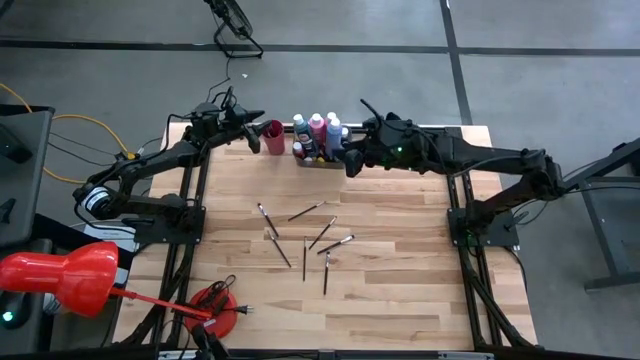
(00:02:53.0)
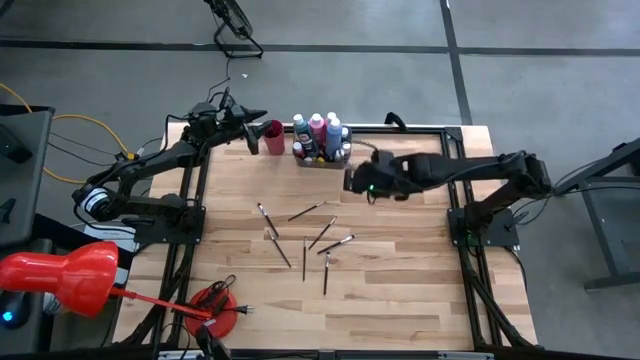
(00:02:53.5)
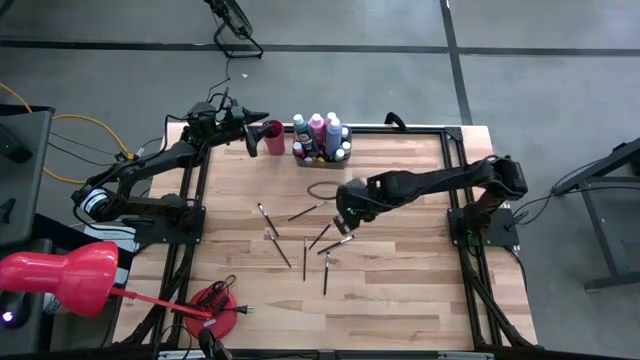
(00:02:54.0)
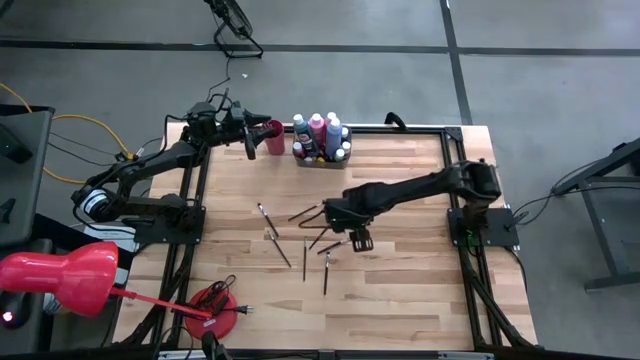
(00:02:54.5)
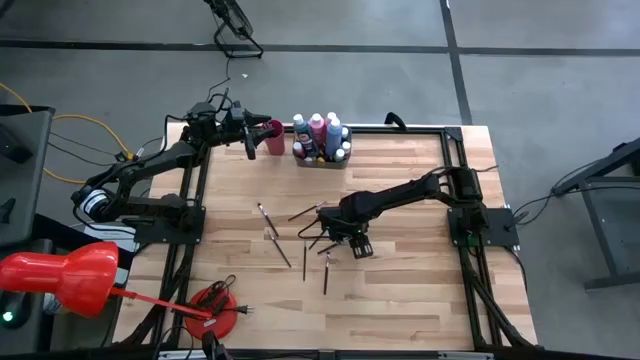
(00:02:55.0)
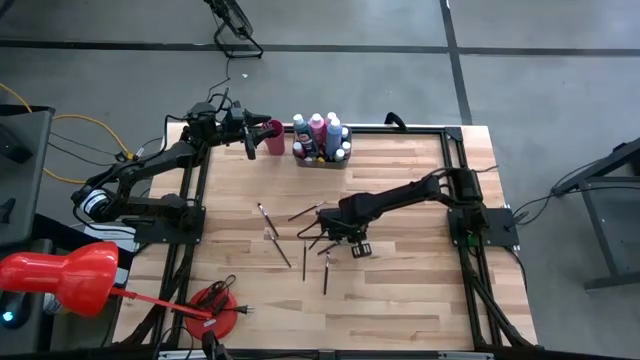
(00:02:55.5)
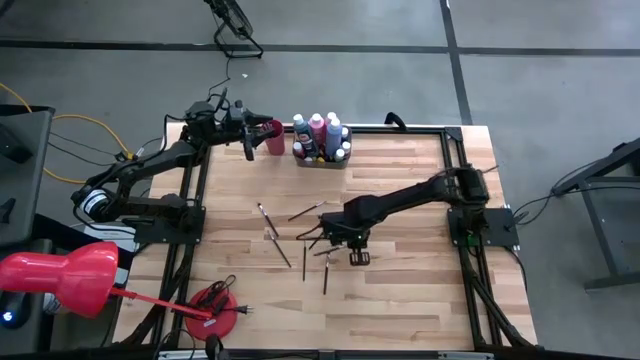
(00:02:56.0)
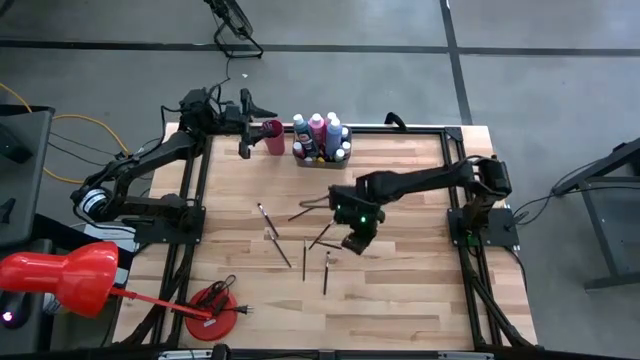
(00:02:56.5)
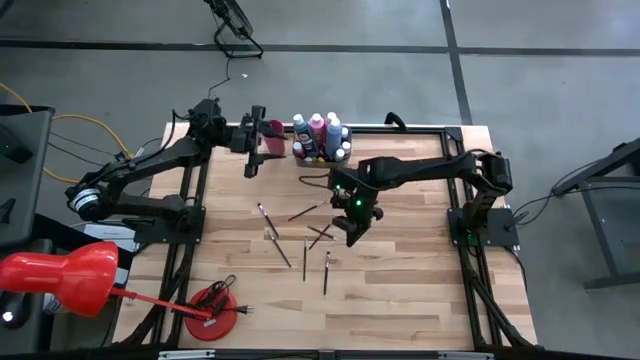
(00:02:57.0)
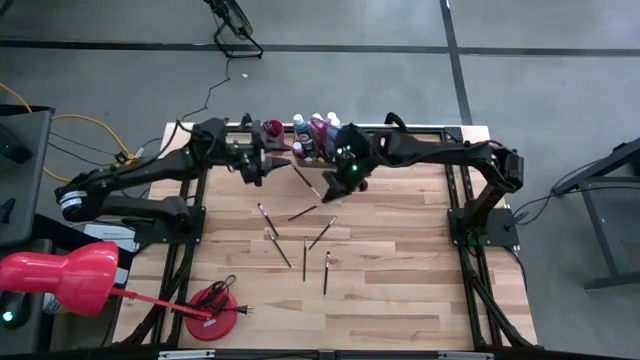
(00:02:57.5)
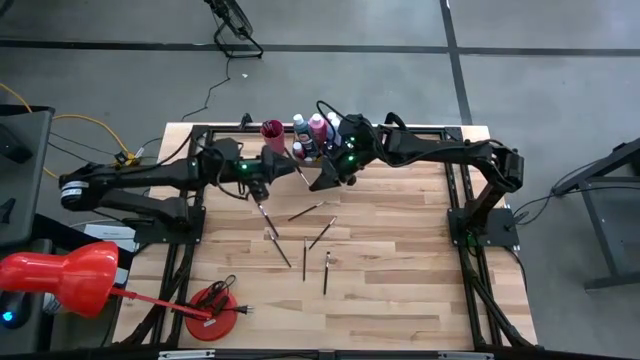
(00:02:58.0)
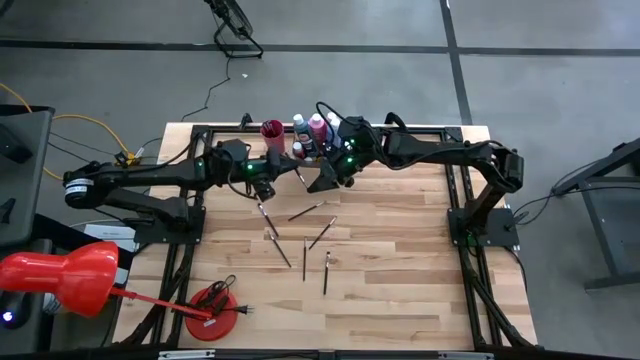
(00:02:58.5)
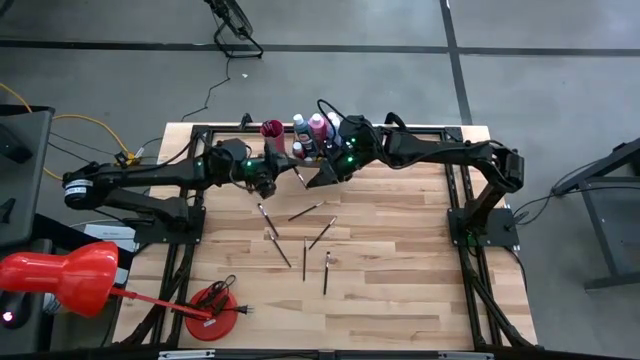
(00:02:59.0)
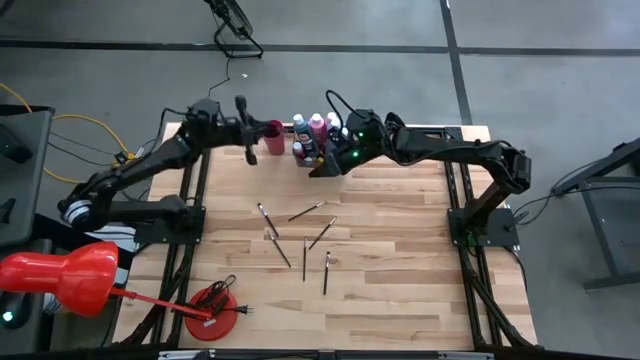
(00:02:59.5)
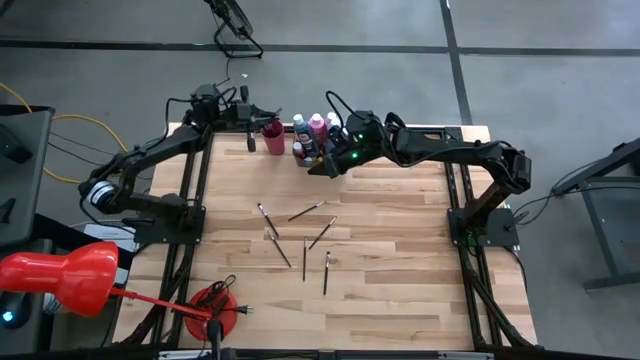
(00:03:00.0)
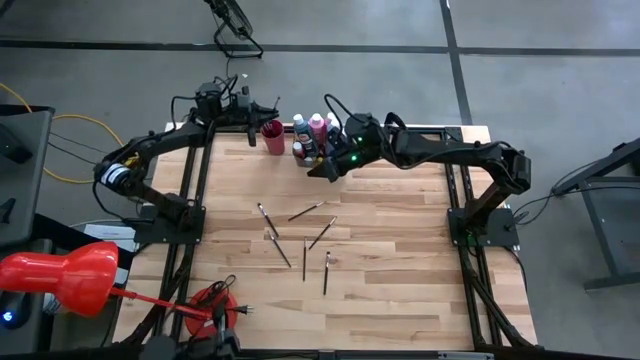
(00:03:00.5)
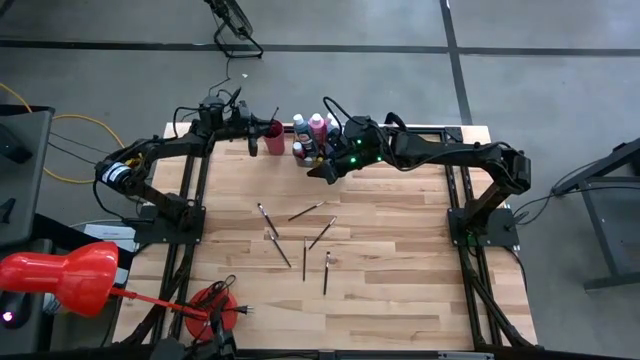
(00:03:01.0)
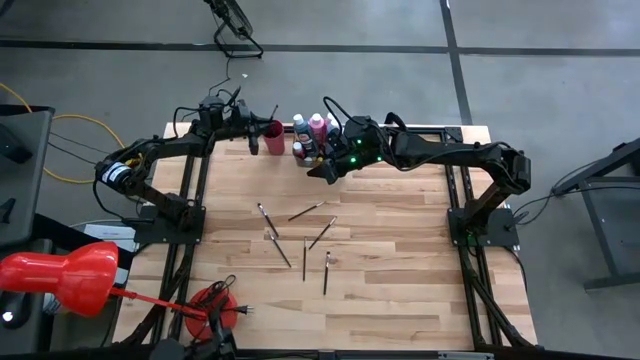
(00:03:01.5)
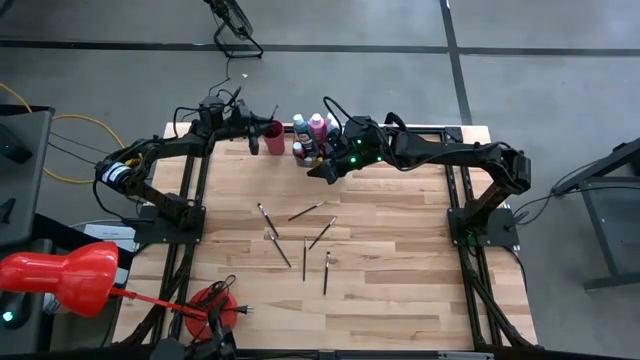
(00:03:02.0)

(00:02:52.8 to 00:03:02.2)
Task: Pick & Place Paint Supplies
Put the black paint brush into the pink cup

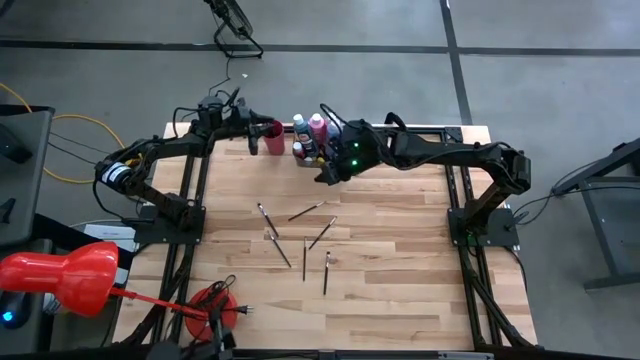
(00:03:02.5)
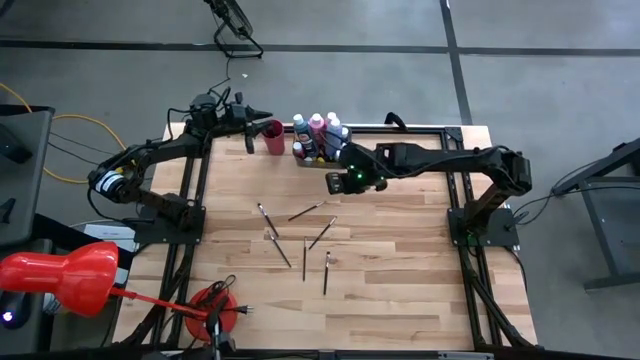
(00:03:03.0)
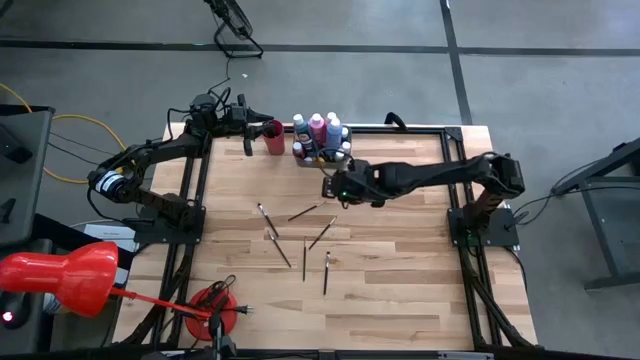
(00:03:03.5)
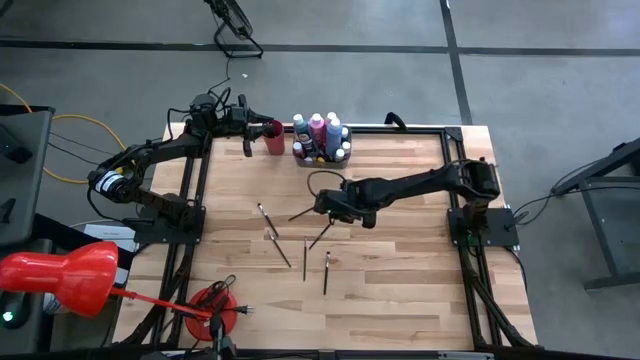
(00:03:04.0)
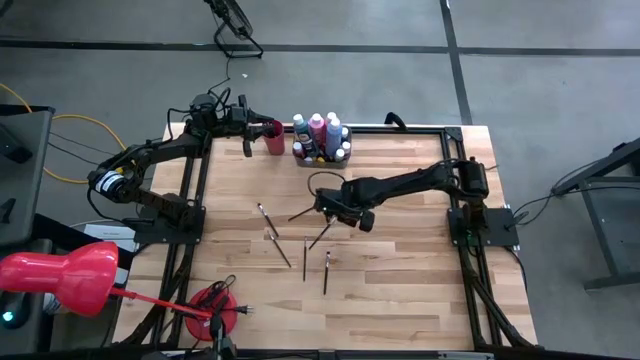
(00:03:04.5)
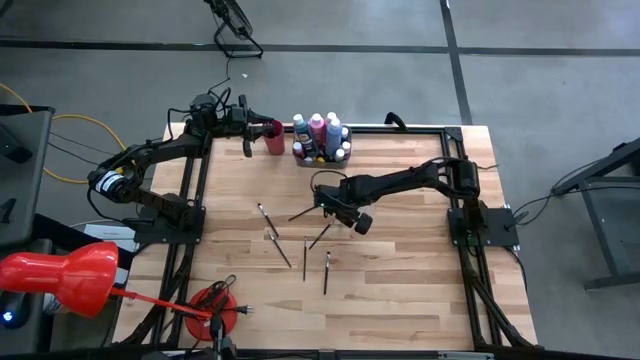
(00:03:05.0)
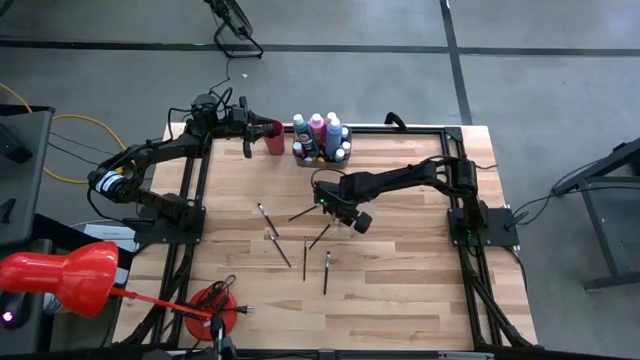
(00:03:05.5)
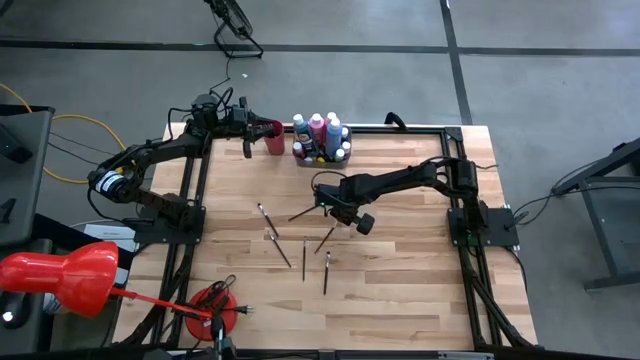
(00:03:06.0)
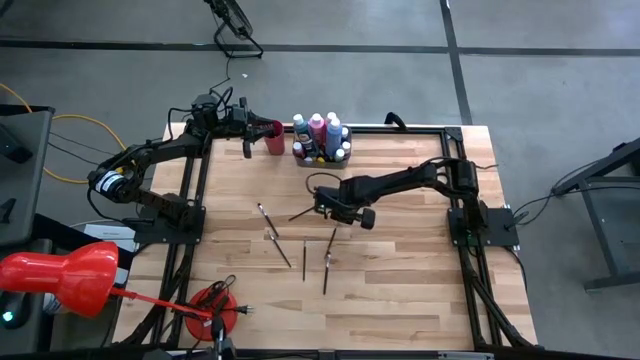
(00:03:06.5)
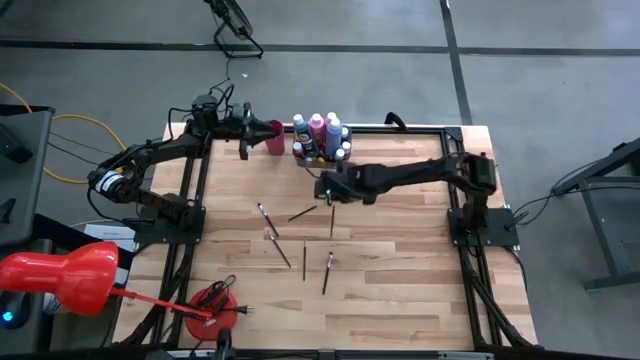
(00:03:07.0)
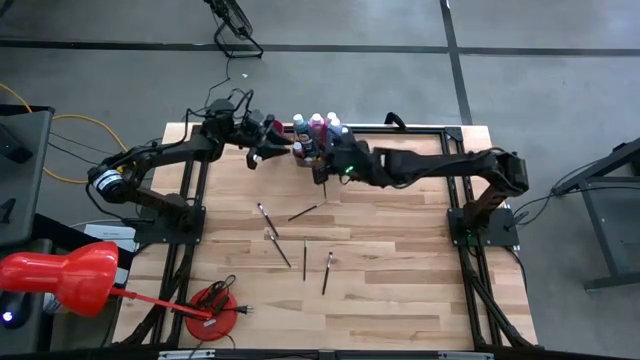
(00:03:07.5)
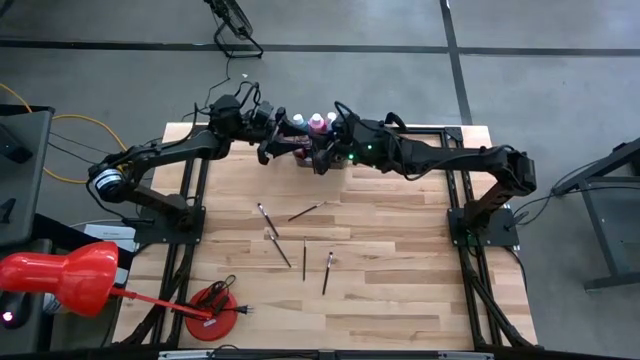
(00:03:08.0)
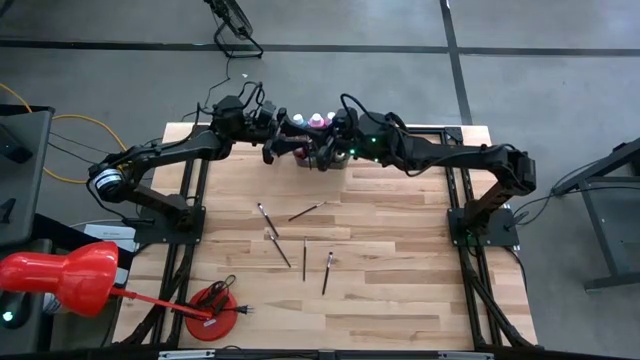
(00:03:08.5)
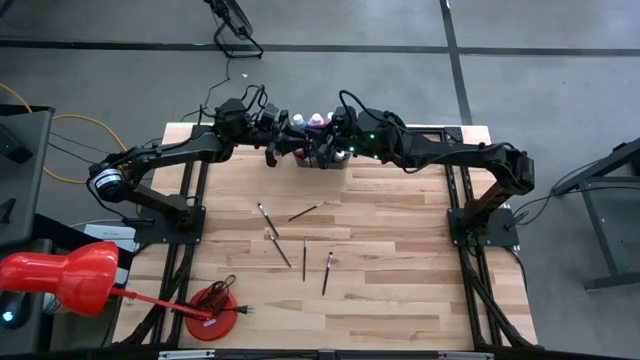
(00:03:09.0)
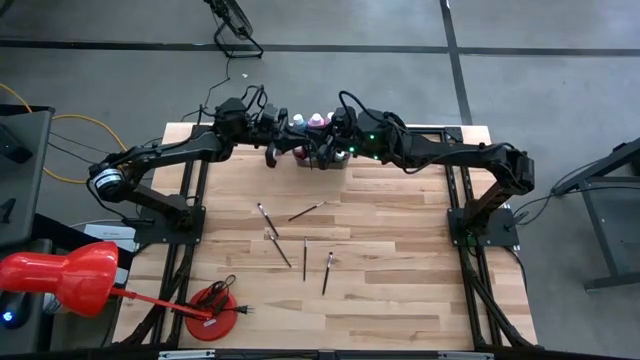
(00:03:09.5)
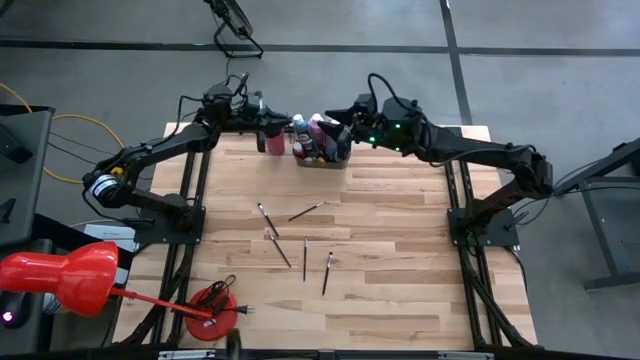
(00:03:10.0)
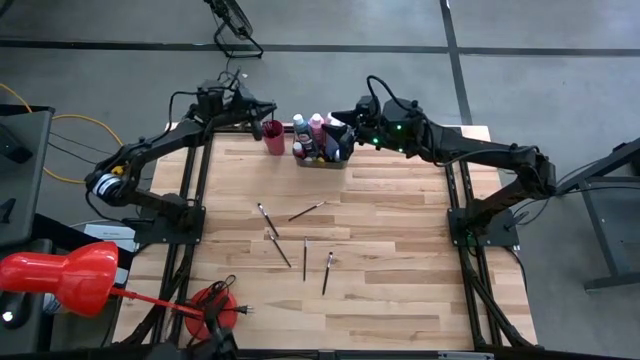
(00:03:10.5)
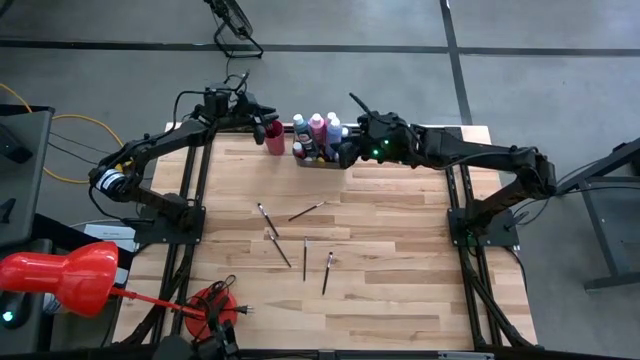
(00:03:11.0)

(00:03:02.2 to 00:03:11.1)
Put the black paint brush into the pink cup

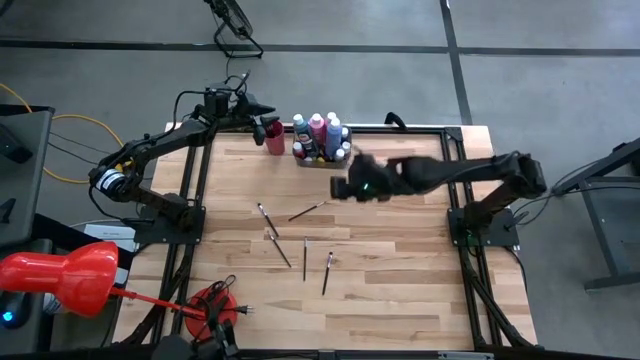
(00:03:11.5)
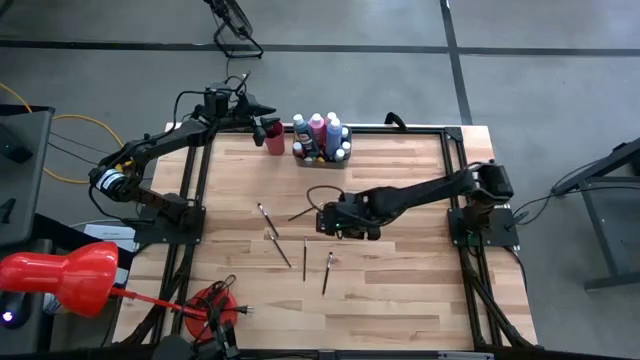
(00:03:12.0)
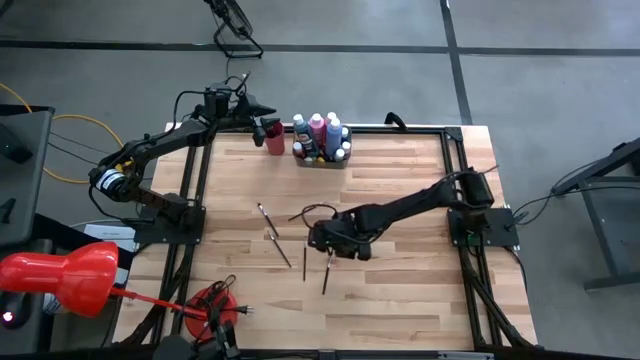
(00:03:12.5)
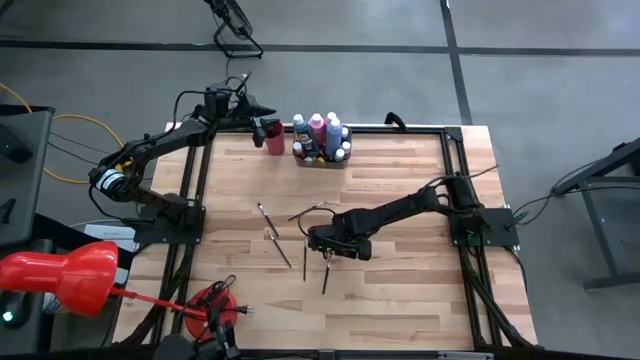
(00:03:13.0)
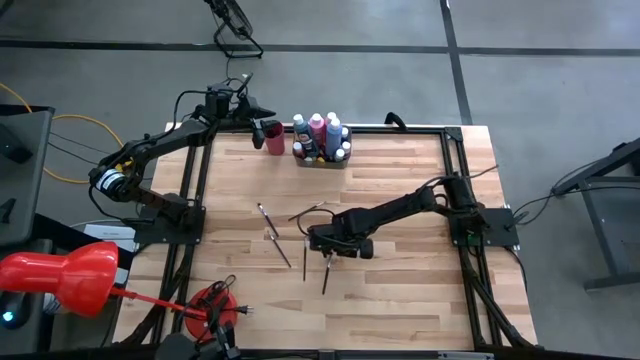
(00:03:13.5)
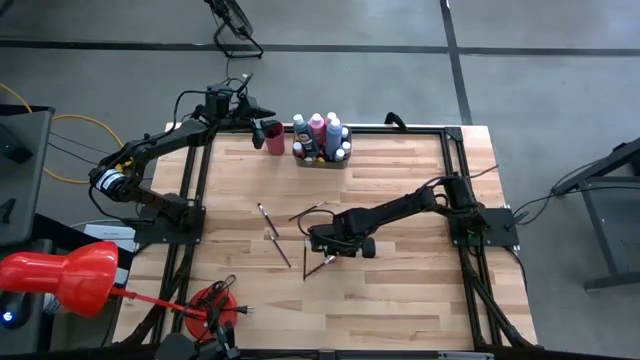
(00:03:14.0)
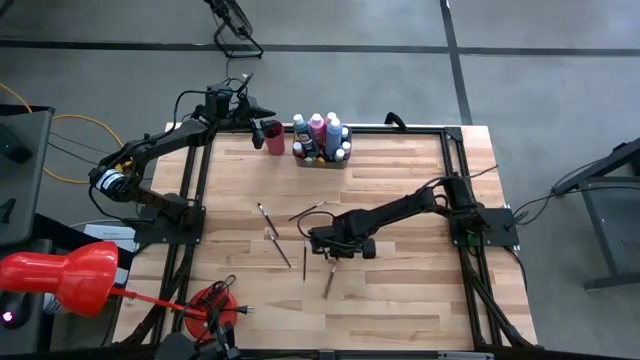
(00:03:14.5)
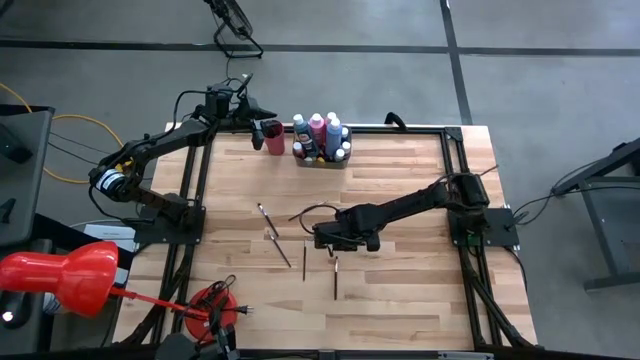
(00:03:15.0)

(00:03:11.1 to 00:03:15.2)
Put the black paint brush into the pink cup
